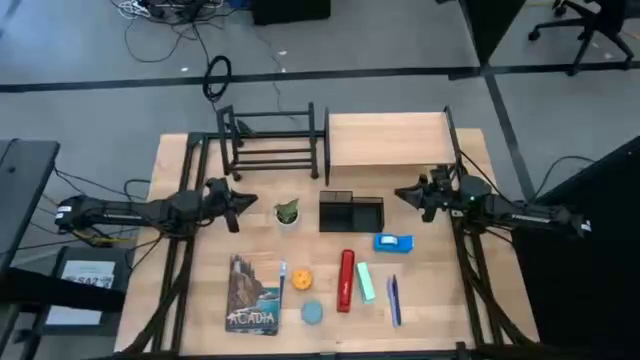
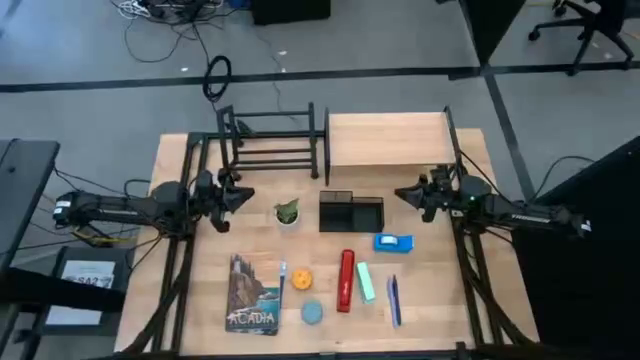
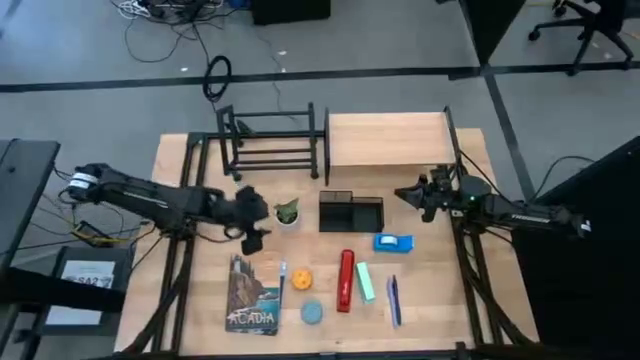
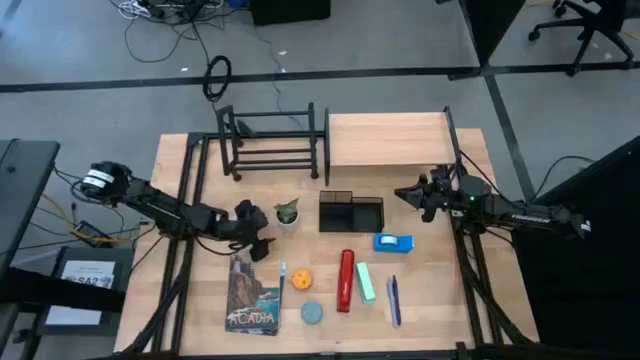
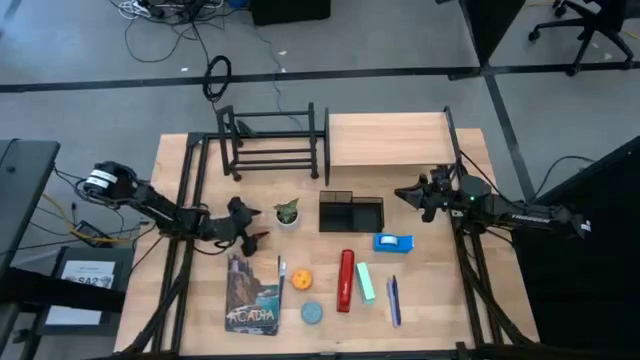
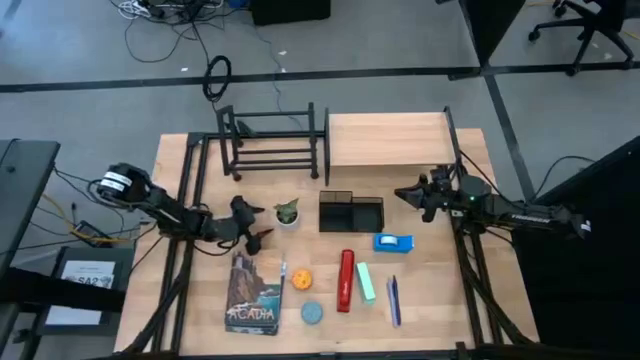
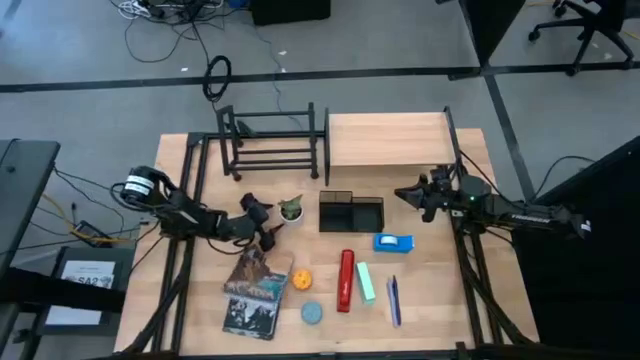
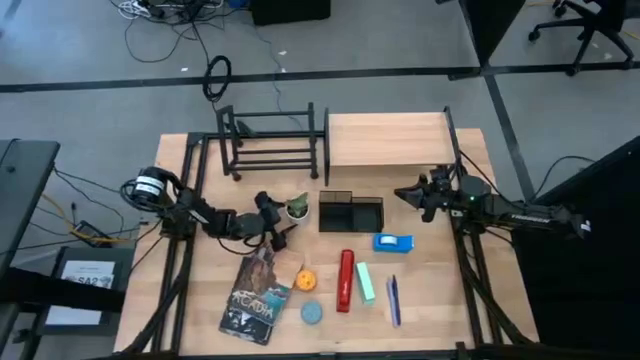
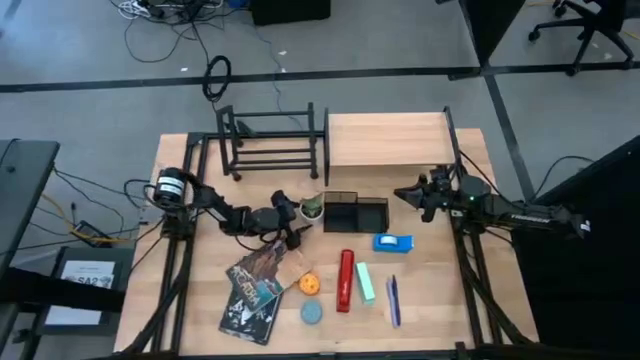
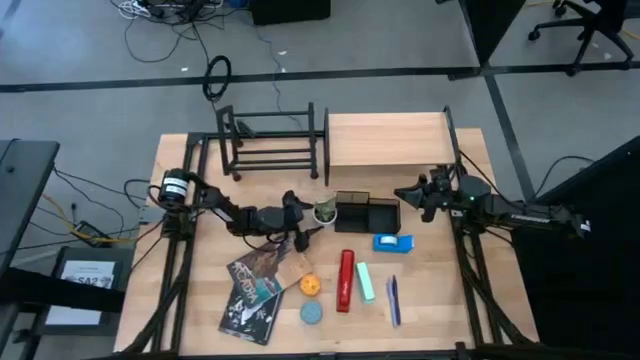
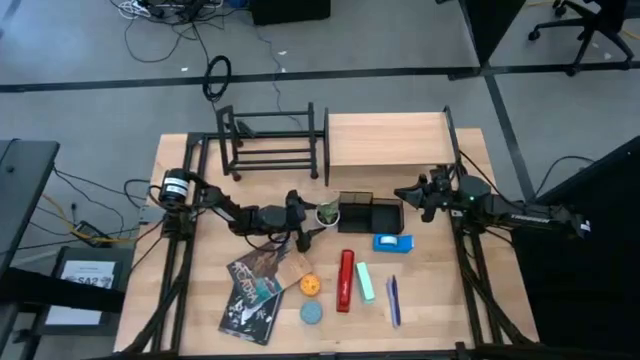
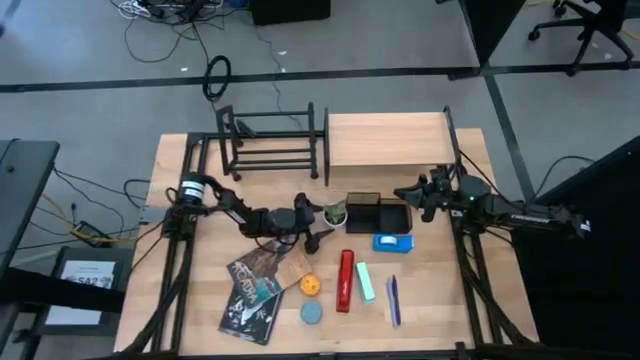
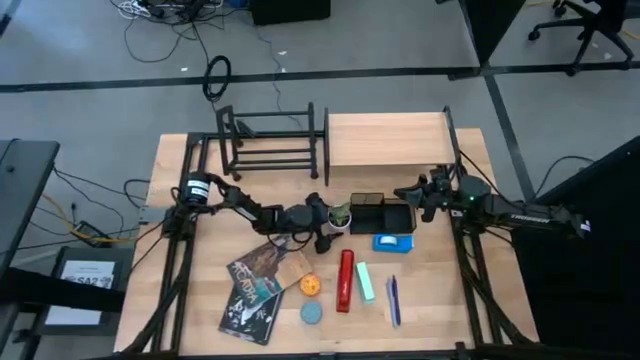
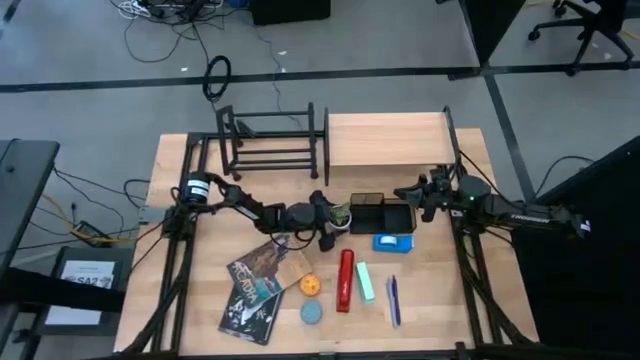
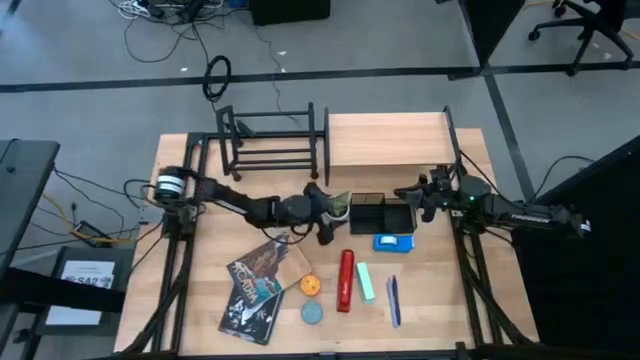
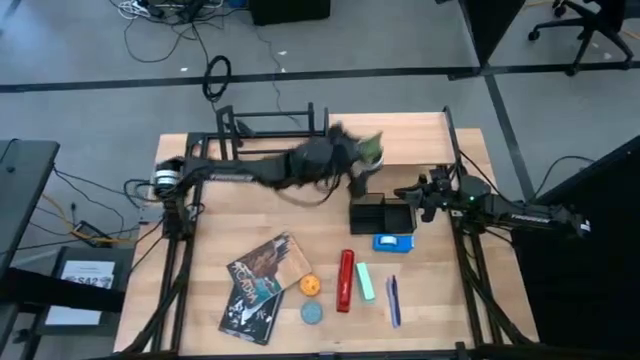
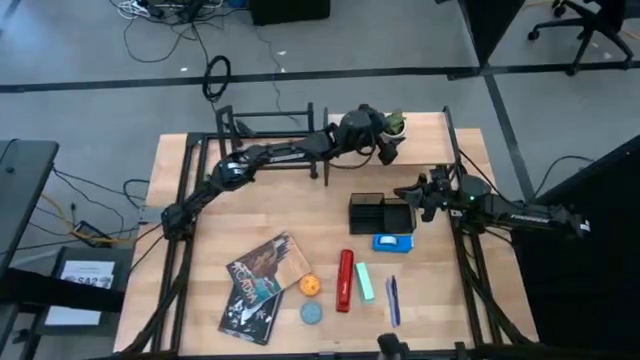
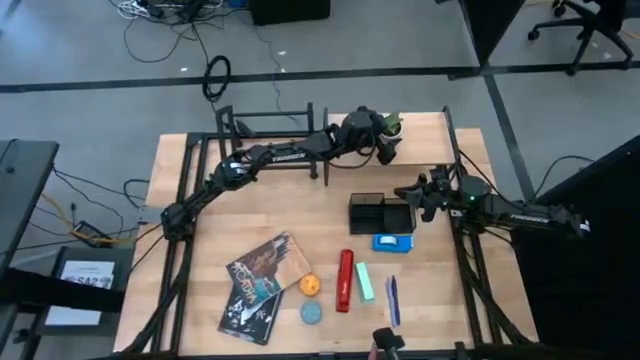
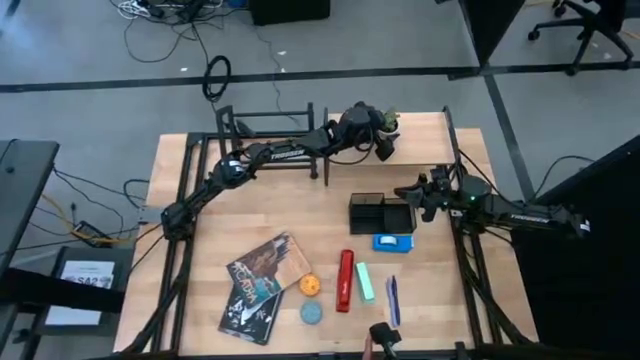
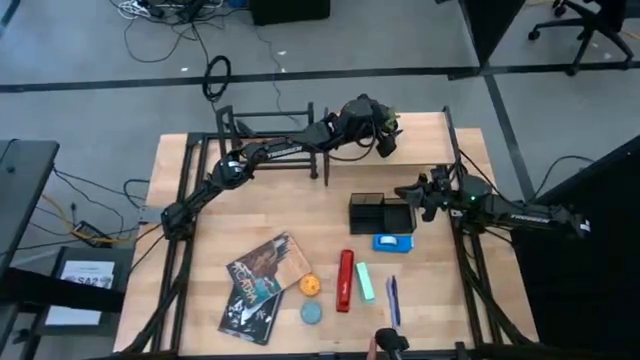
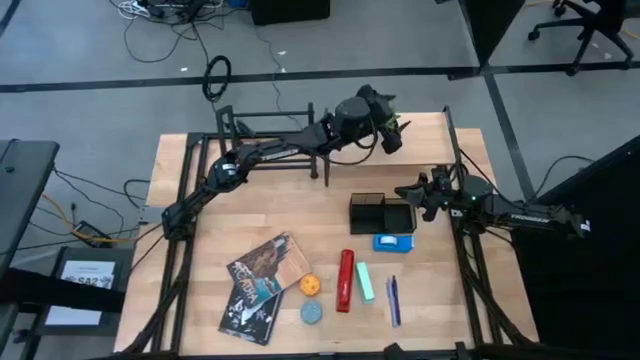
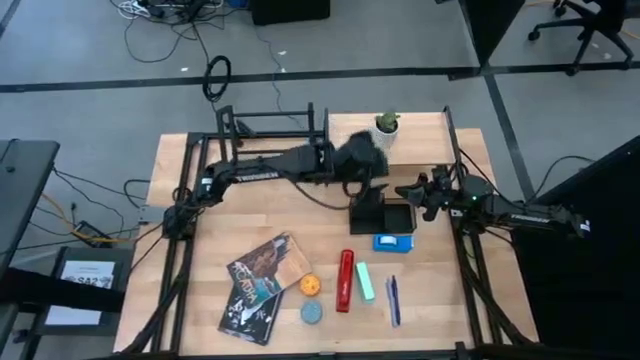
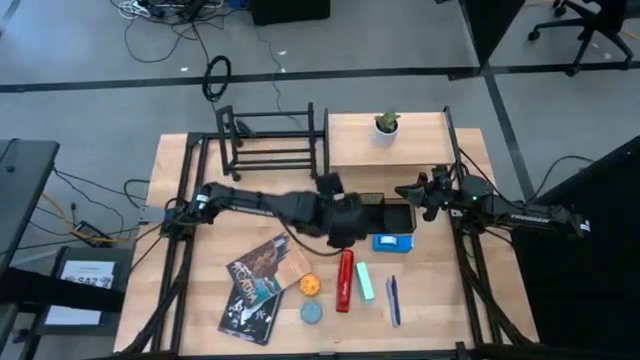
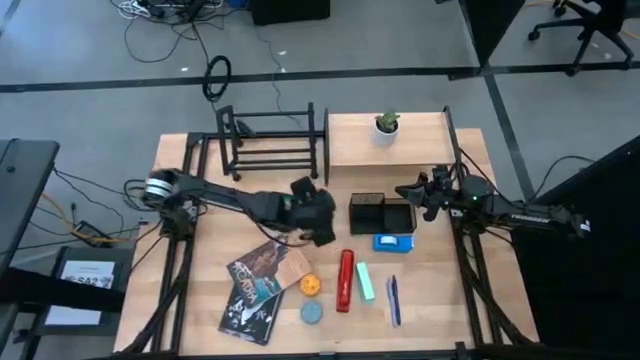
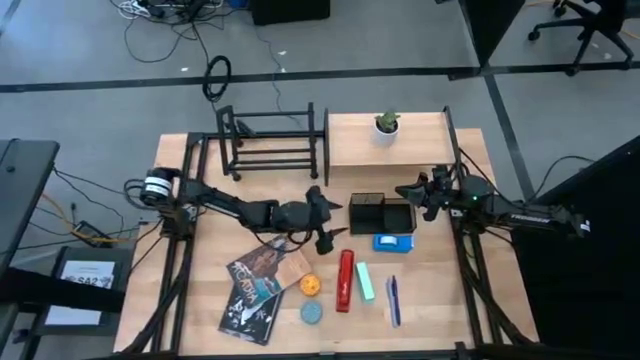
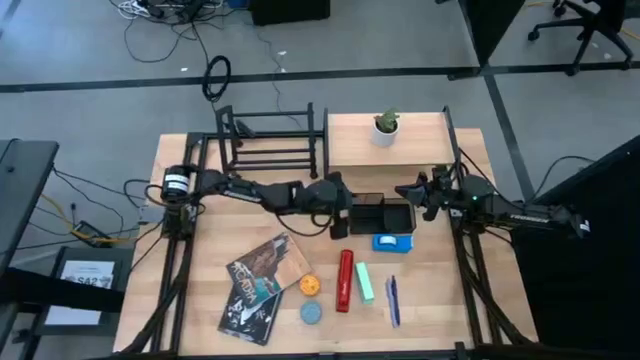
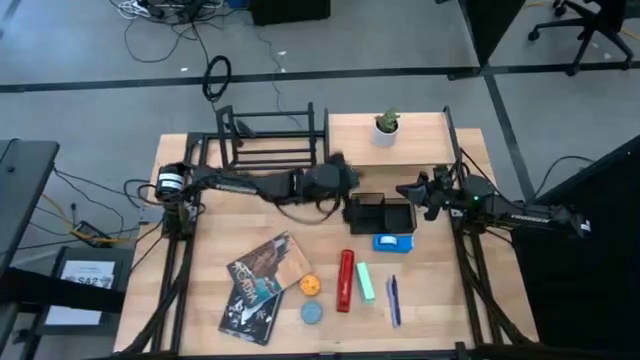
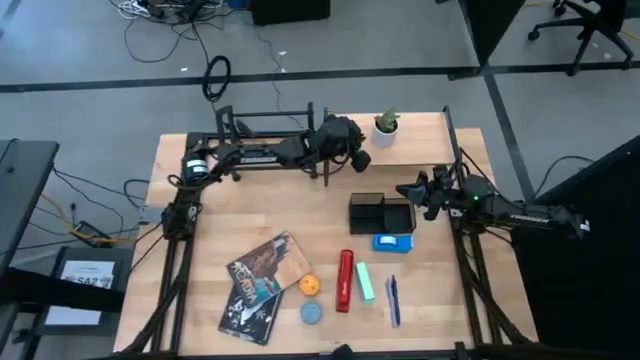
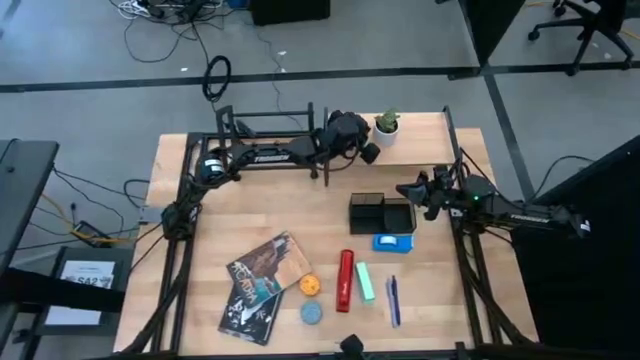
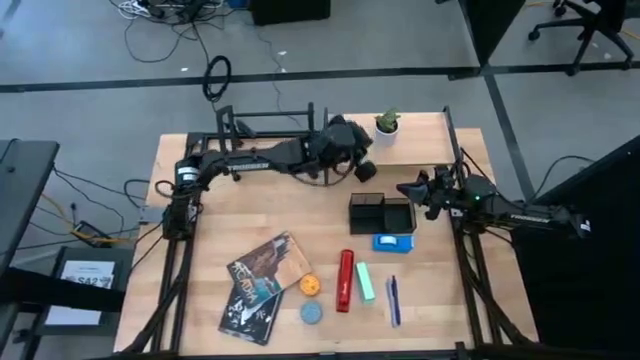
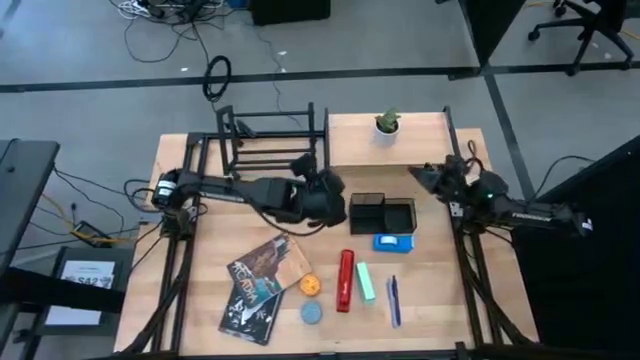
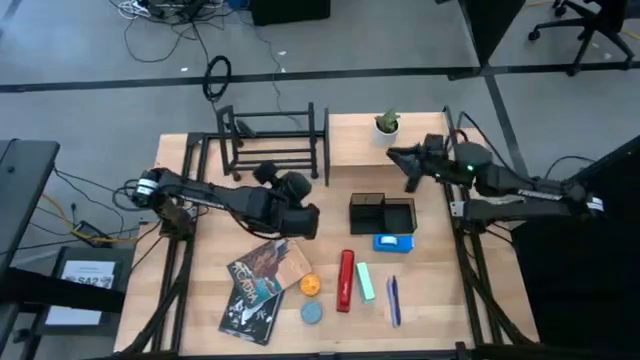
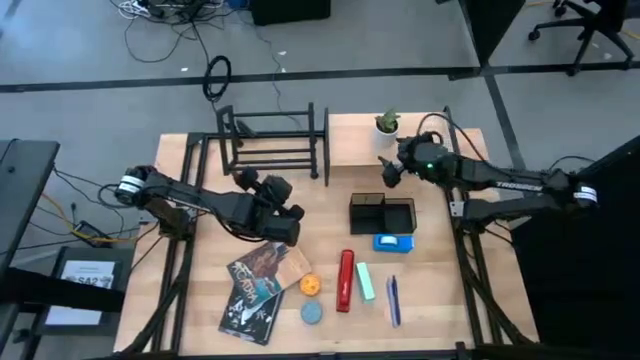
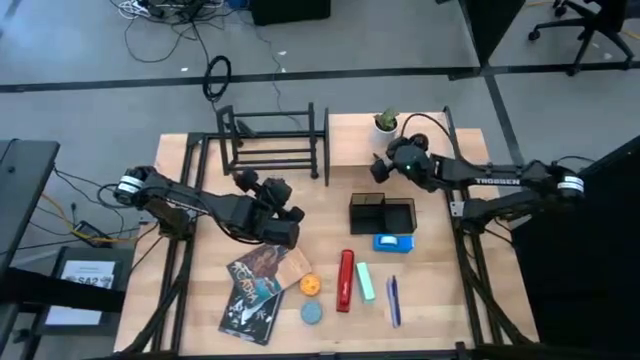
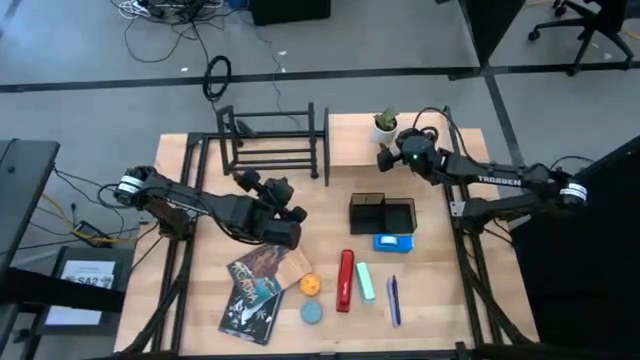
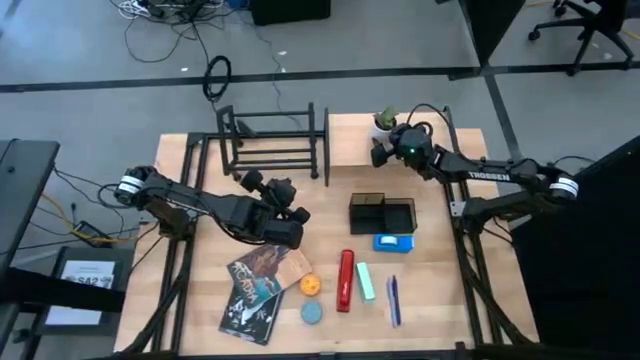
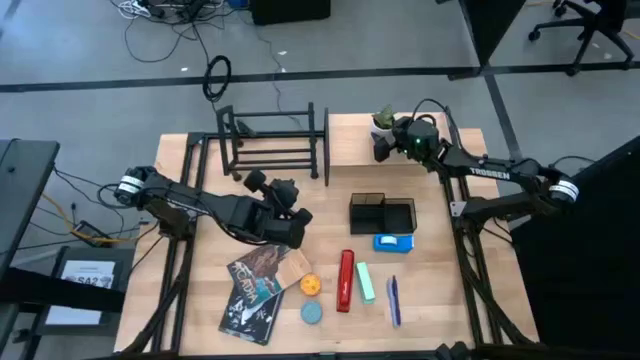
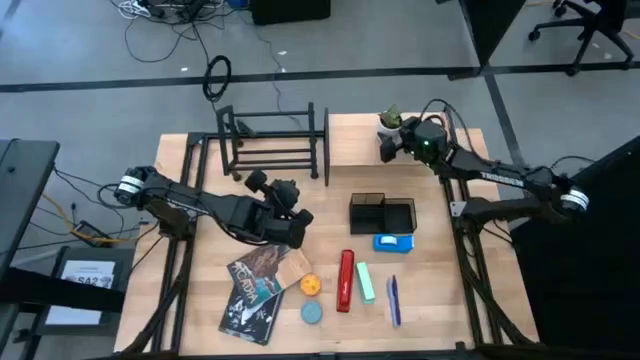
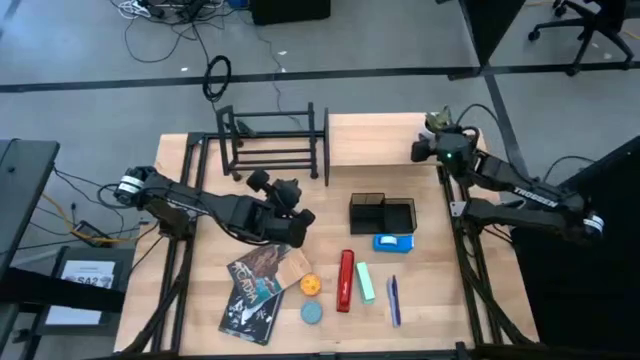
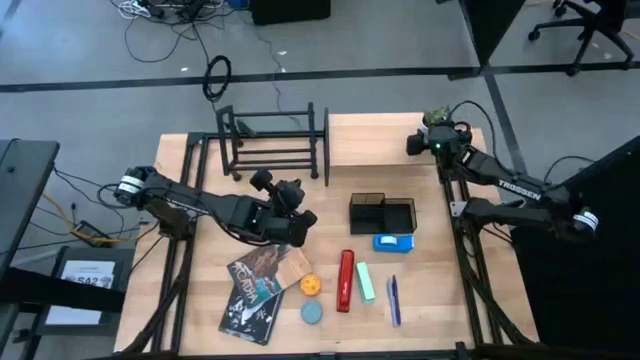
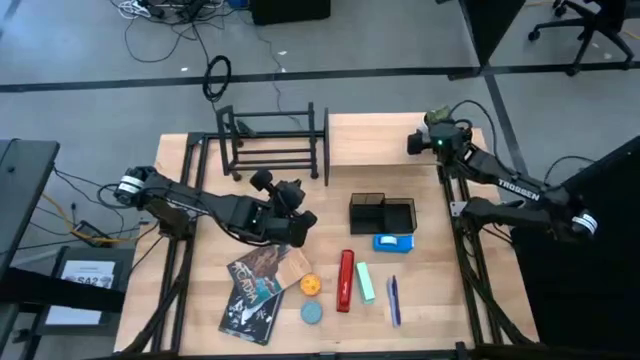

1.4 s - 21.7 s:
Task: Stock shelves
Put the white vase plant on the shelf
